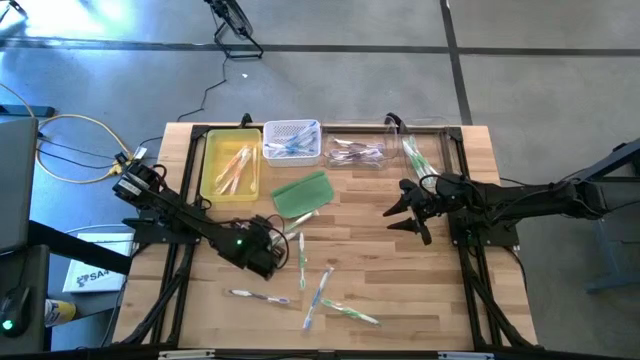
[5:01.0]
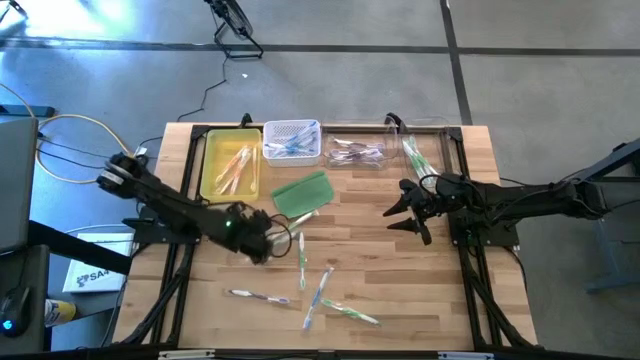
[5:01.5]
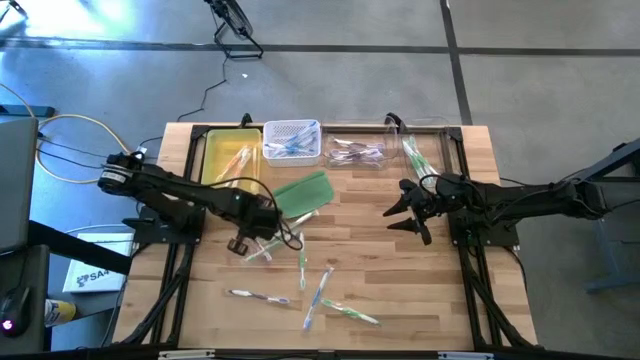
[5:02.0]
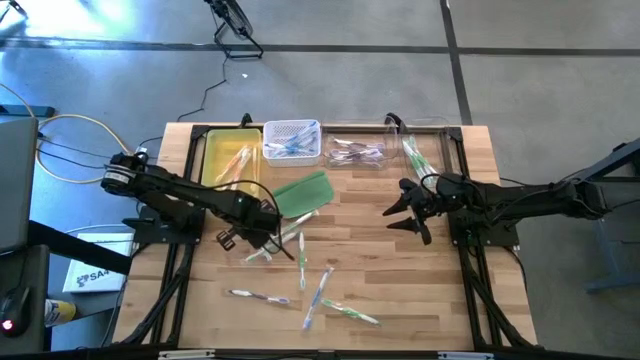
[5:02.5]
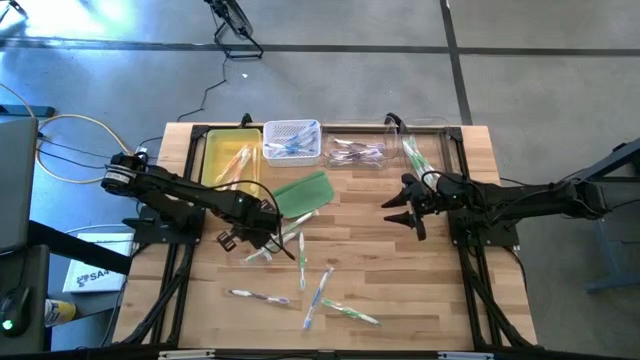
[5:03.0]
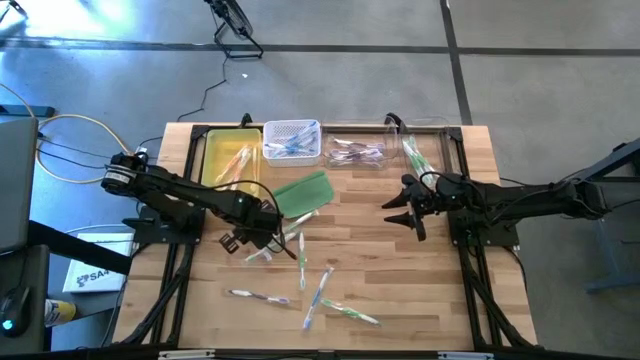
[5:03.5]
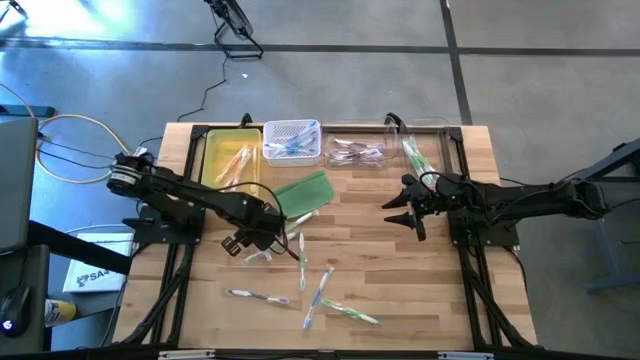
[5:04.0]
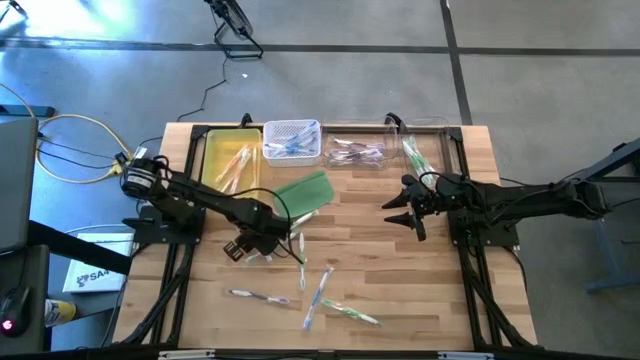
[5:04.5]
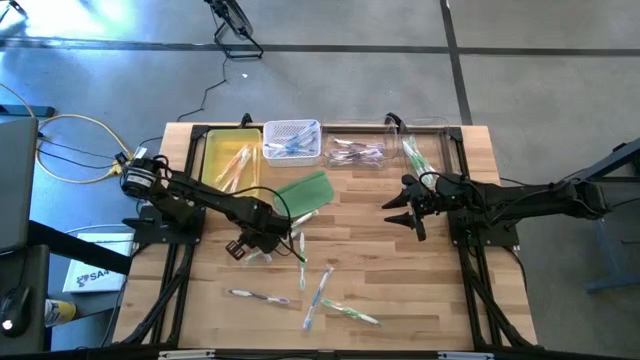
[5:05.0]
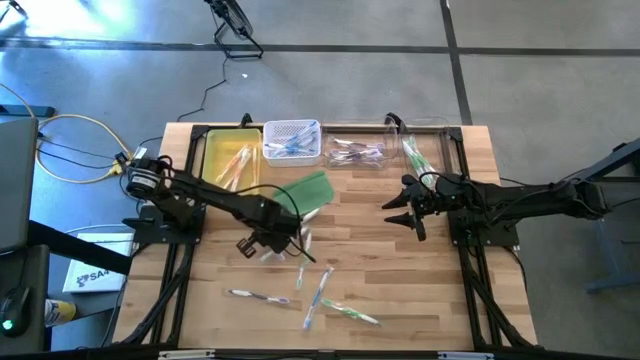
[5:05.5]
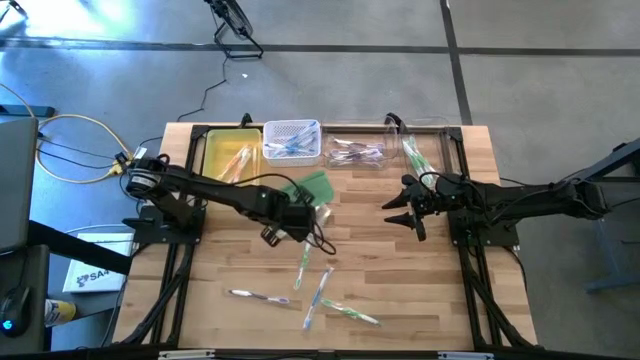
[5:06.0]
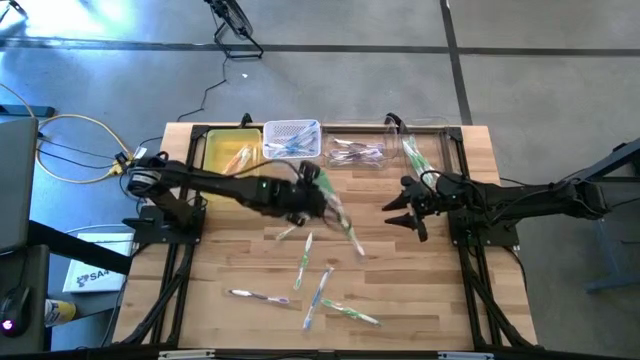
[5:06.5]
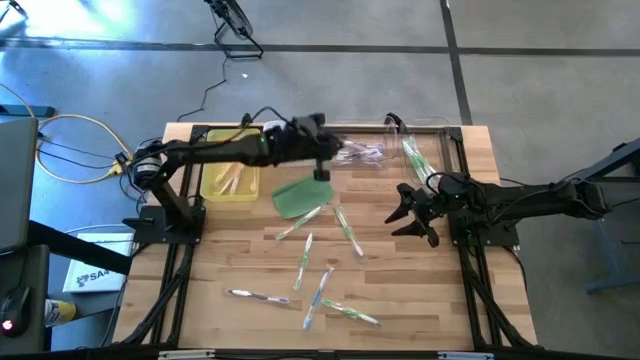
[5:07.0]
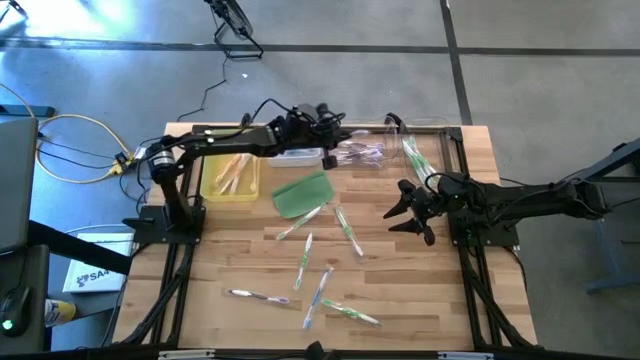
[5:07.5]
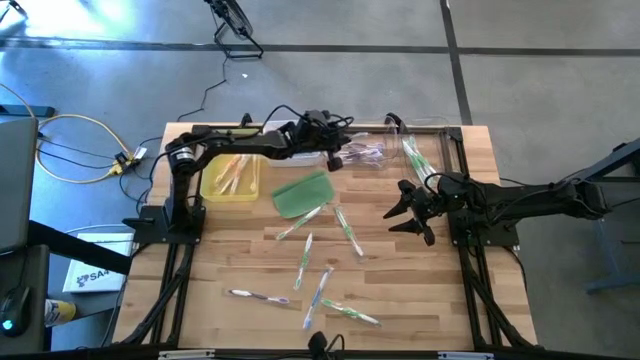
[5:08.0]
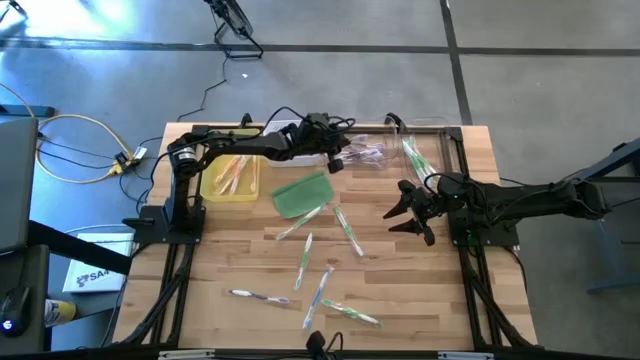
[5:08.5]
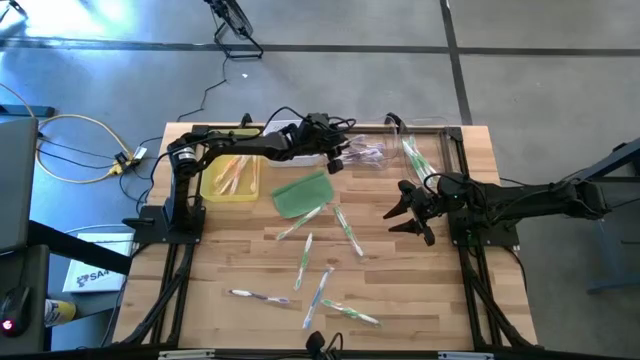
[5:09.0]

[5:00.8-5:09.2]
Task: Pick & Place Toothbrushes
Put the violet toothbrush into the left transparent bin

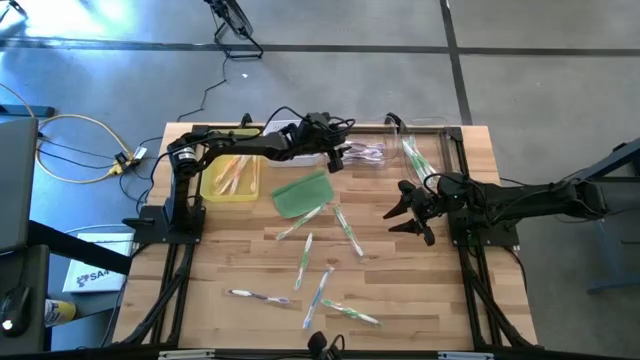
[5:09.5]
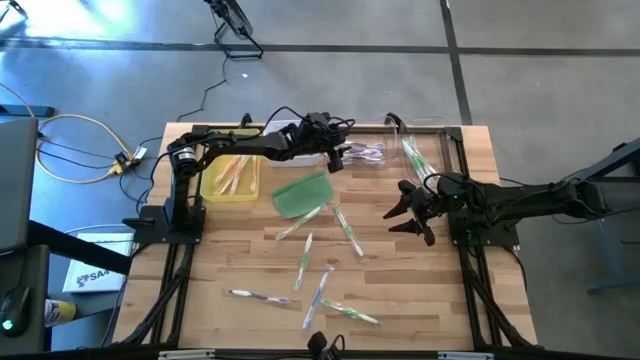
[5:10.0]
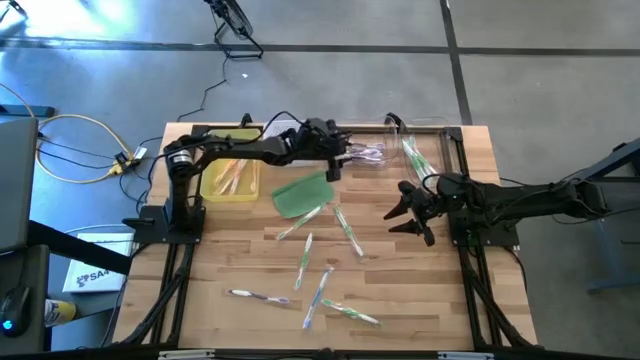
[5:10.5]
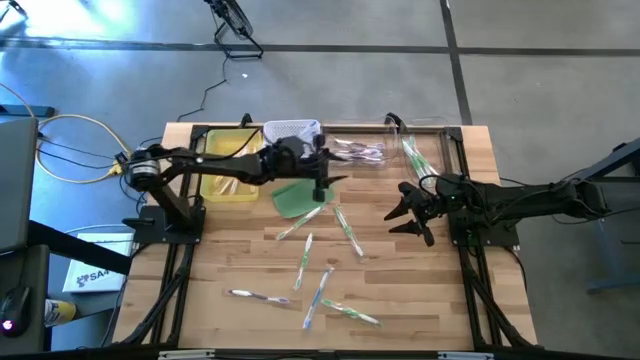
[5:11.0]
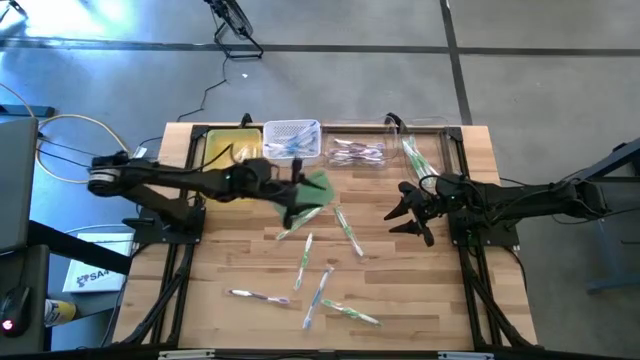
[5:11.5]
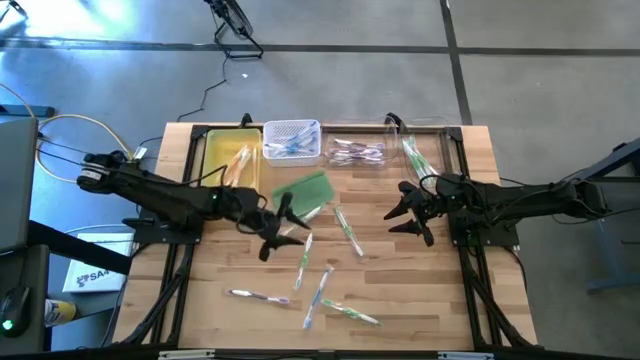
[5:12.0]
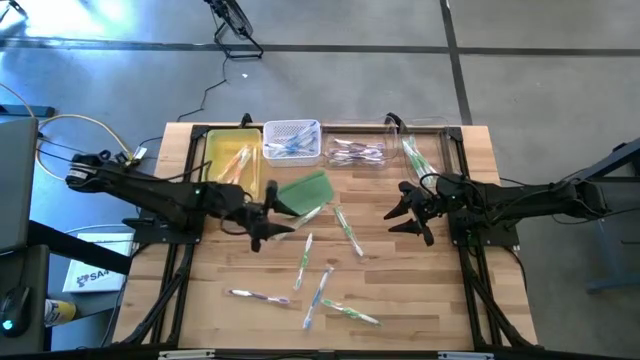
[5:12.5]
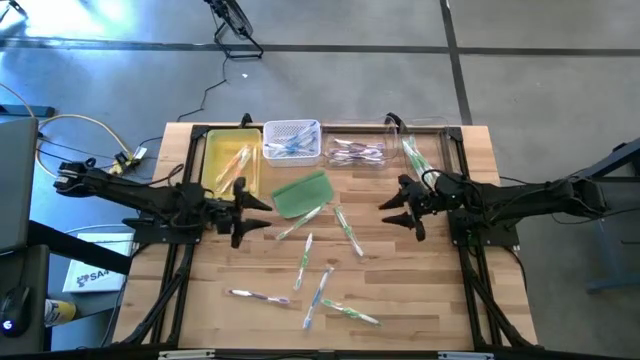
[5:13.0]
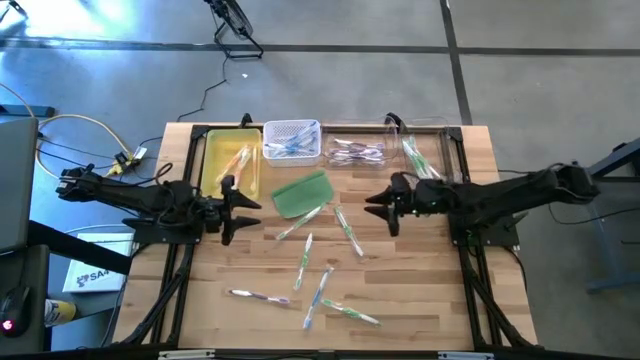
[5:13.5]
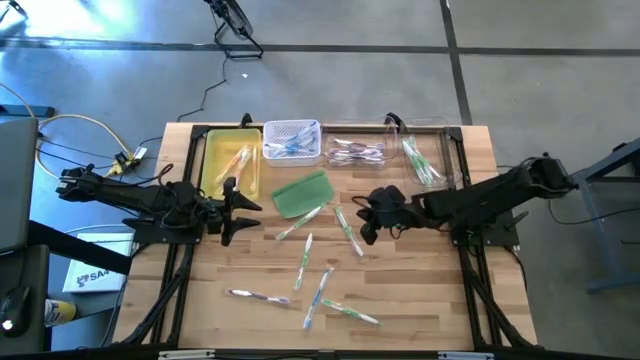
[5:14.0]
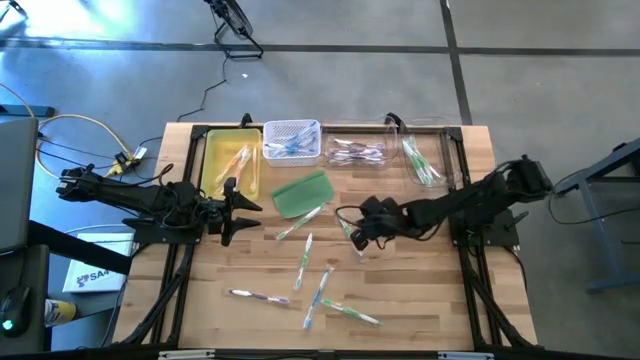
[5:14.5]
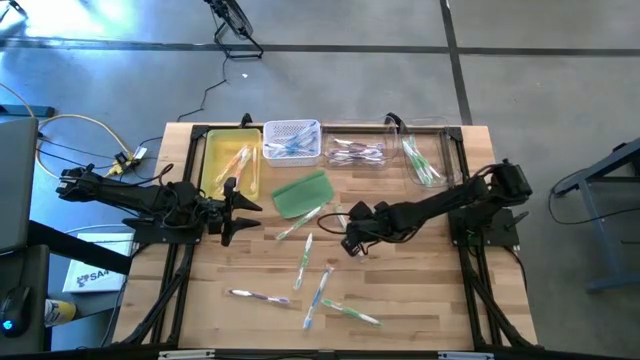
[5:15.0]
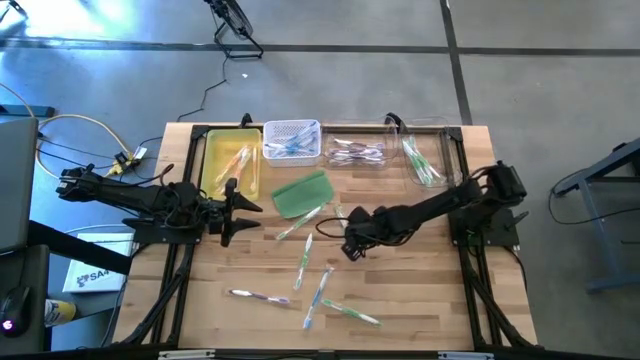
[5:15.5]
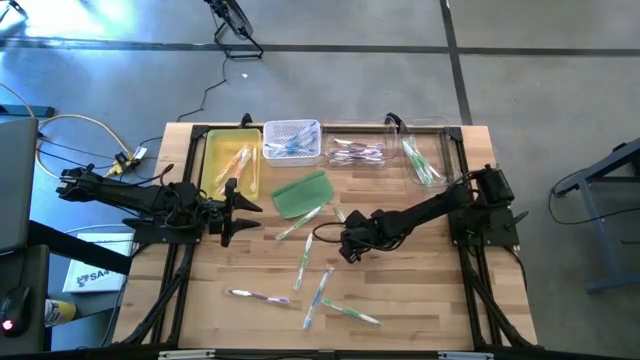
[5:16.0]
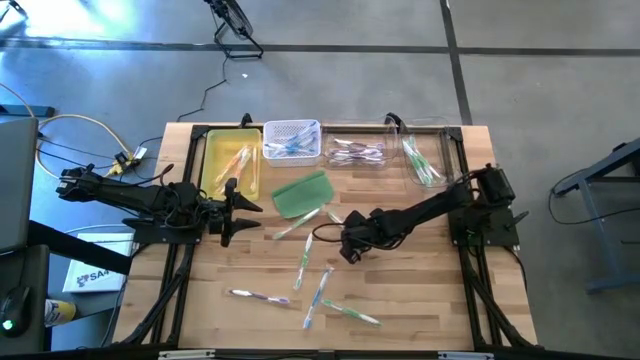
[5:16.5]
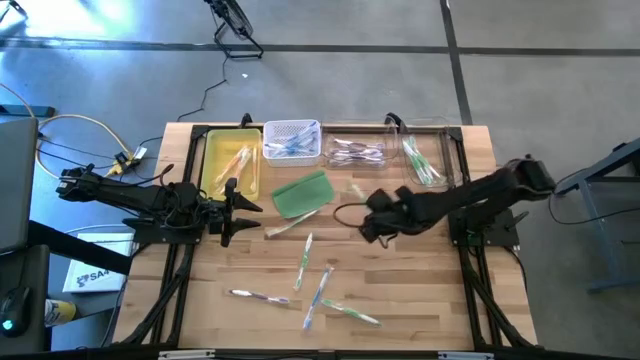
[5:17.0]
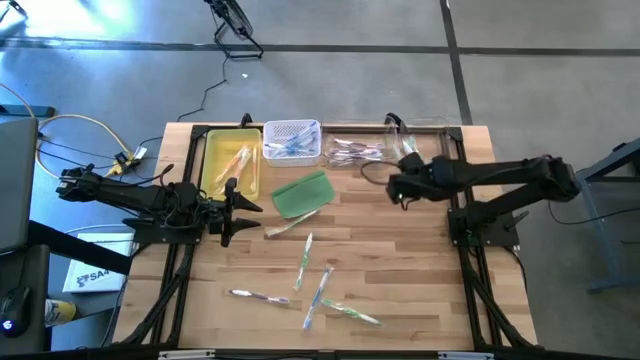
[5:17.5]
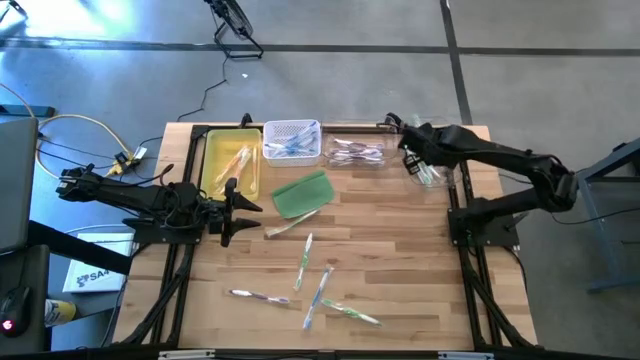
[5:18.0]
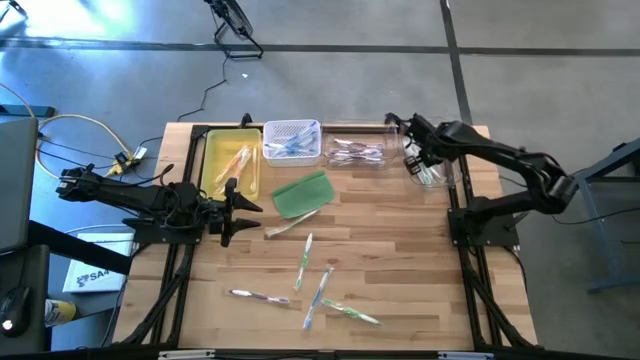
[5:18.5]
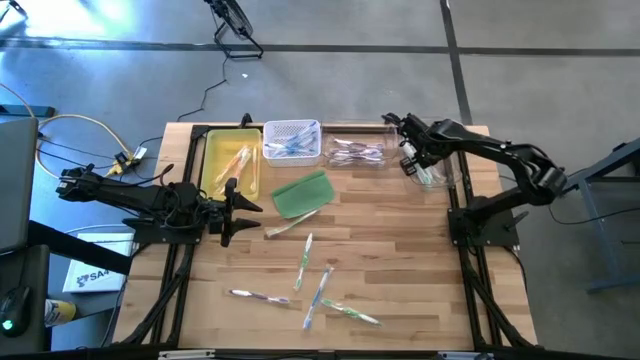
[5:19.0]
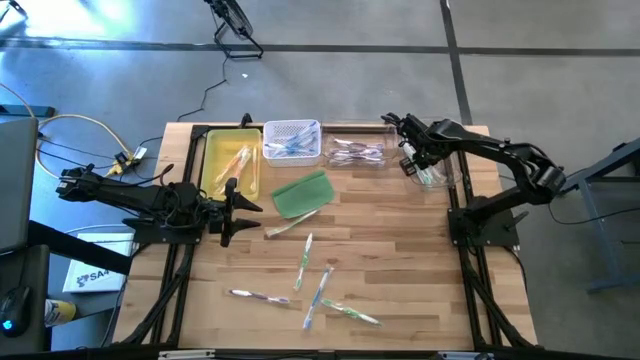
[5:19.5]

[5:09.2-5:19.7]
Put the green toothbrush into the right transparent bin

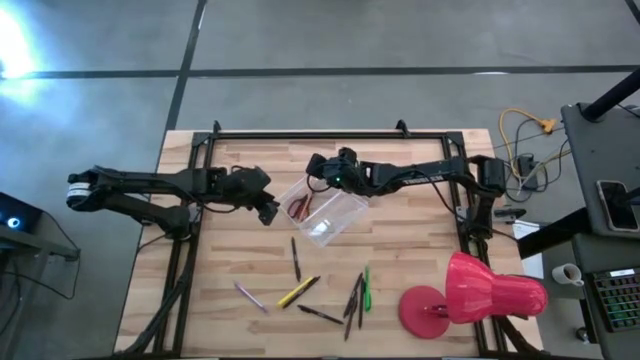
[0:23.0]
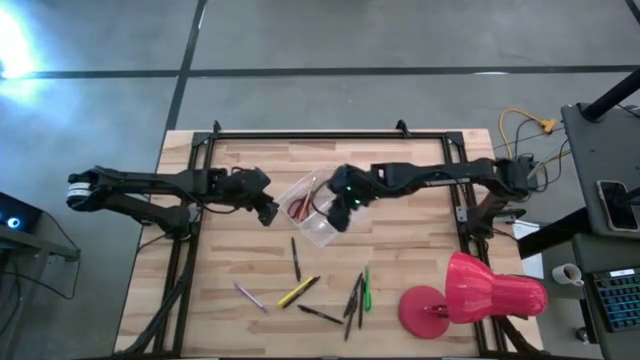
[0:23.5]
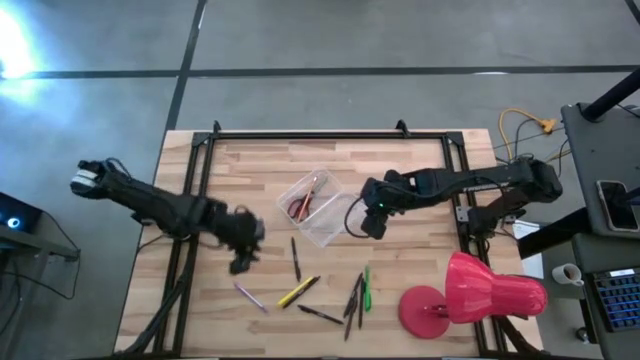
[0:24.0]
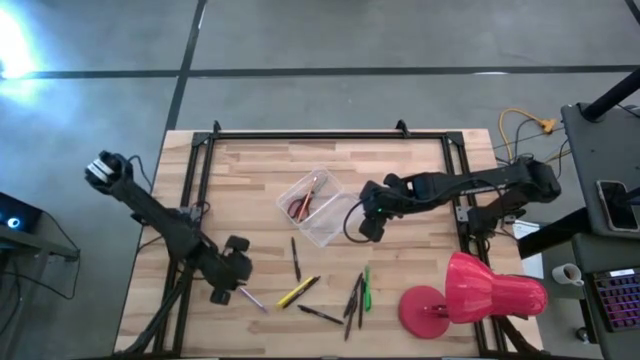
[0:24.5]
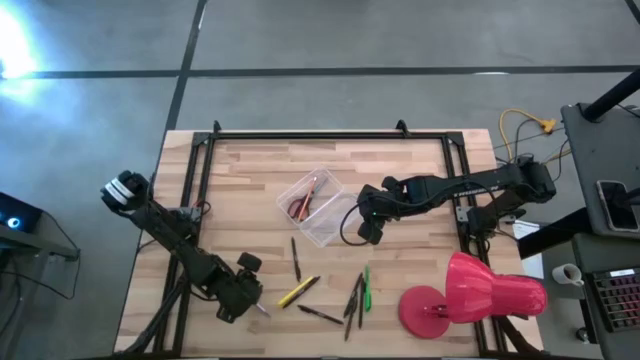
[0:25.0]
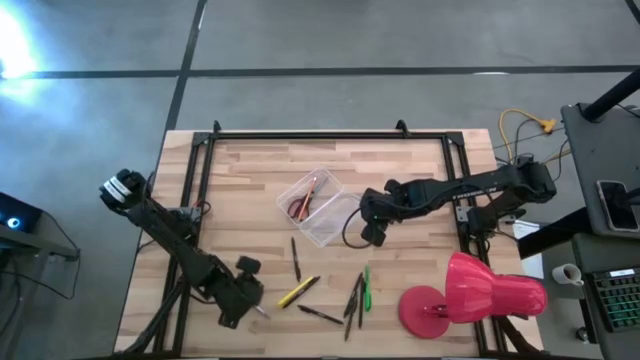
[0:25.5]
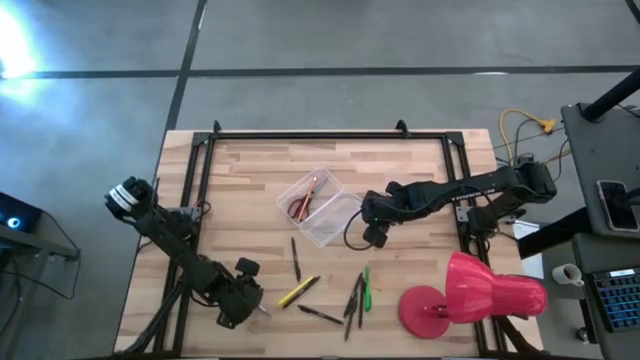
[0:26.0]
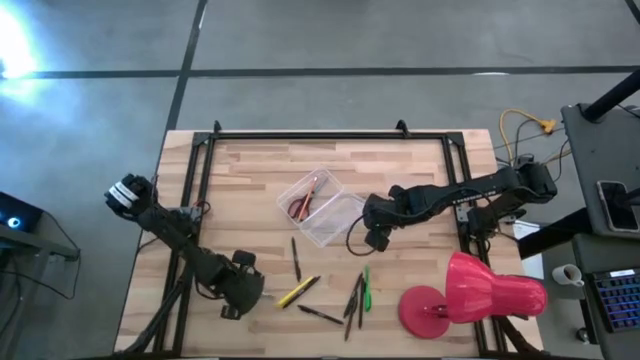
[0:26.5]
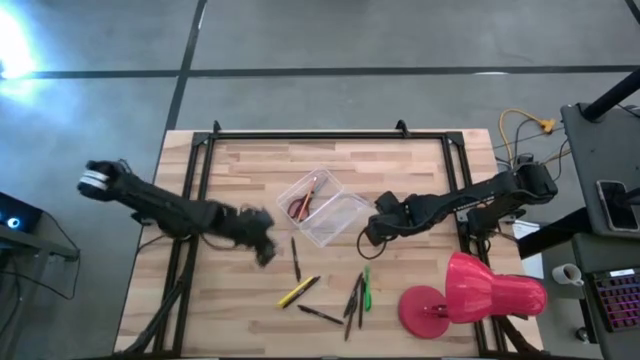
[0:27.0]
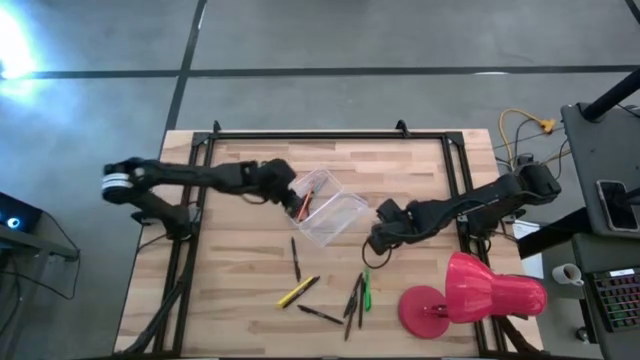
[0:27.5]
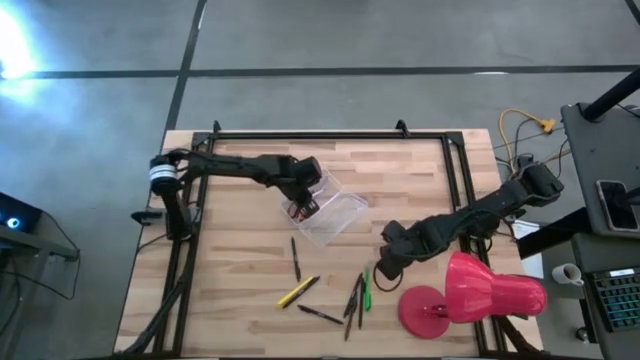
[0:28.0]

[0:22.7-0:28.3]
Task: Pick & place school supplies into a supply box
Put the violet pen into the transparent supply box
